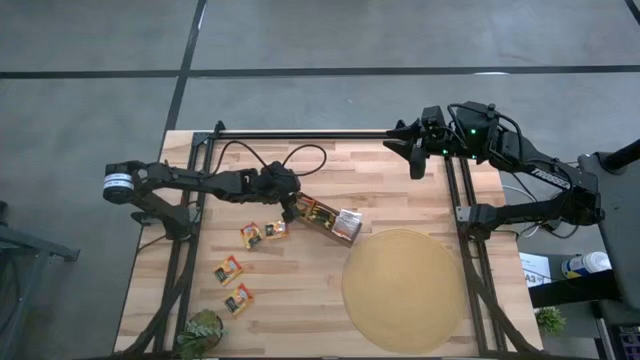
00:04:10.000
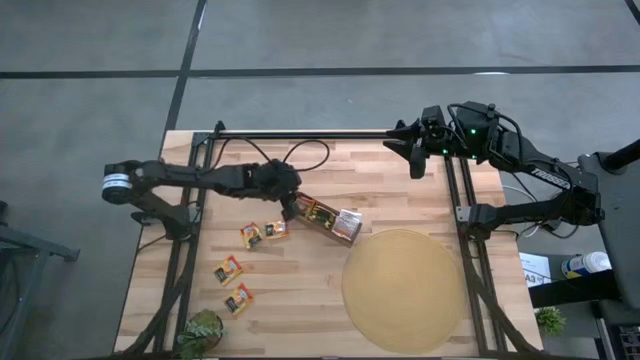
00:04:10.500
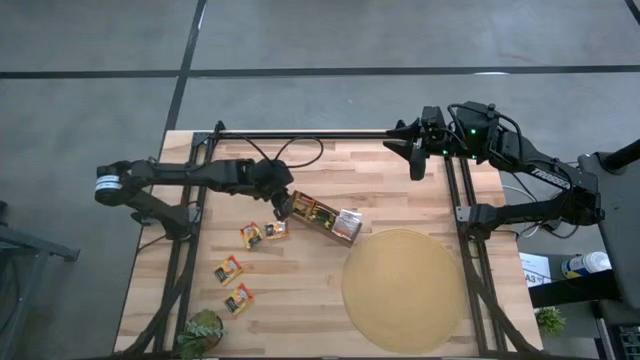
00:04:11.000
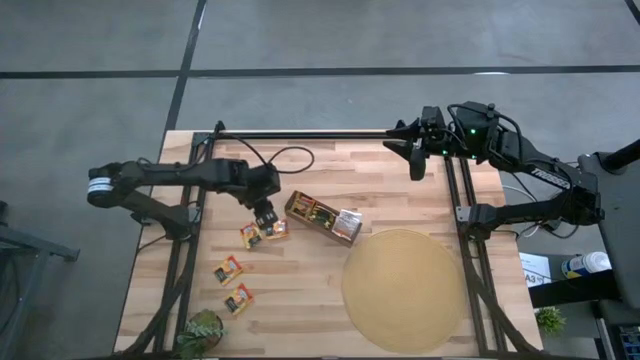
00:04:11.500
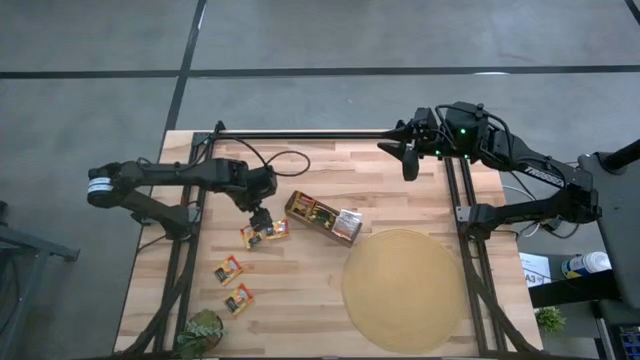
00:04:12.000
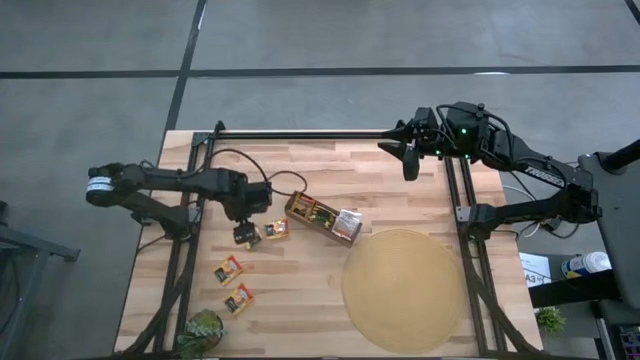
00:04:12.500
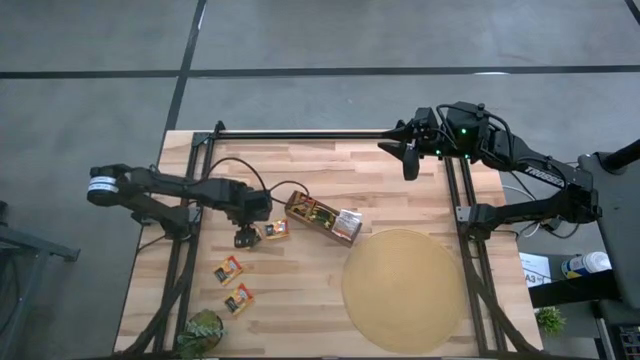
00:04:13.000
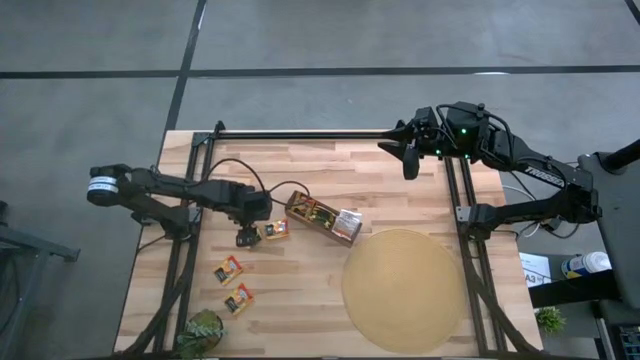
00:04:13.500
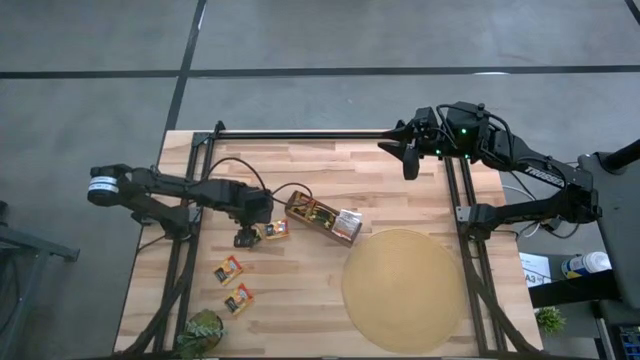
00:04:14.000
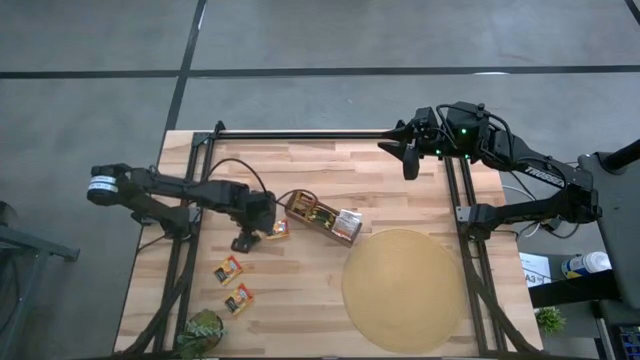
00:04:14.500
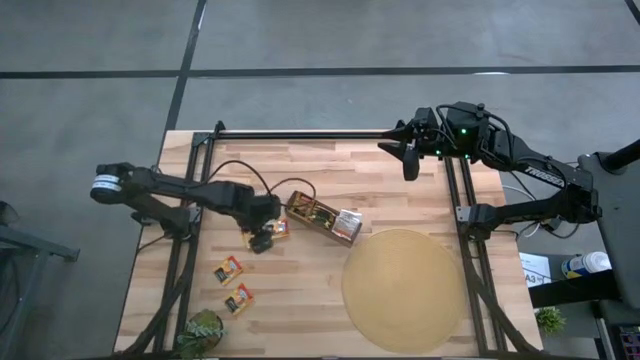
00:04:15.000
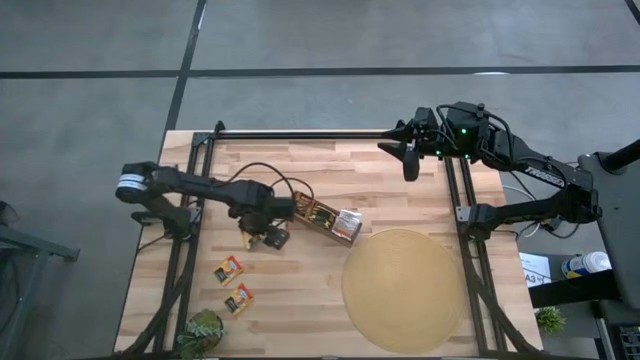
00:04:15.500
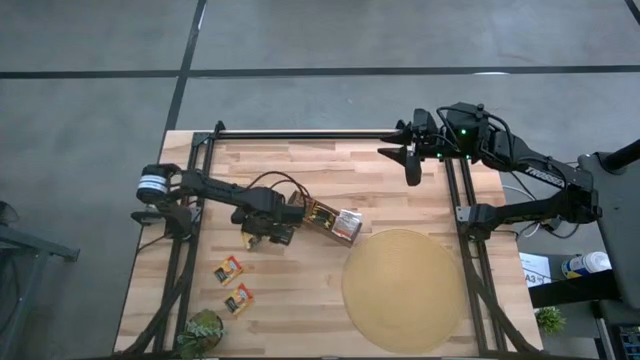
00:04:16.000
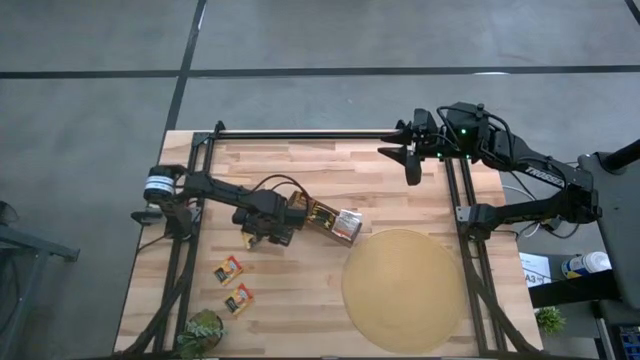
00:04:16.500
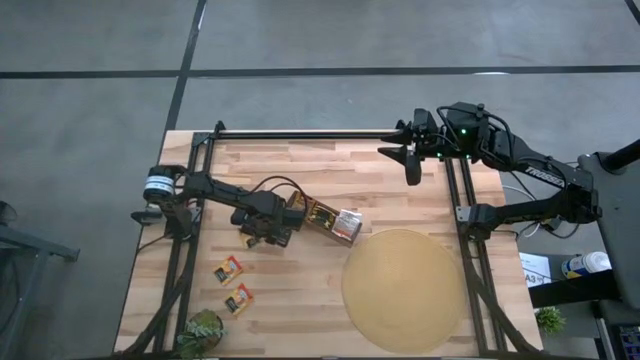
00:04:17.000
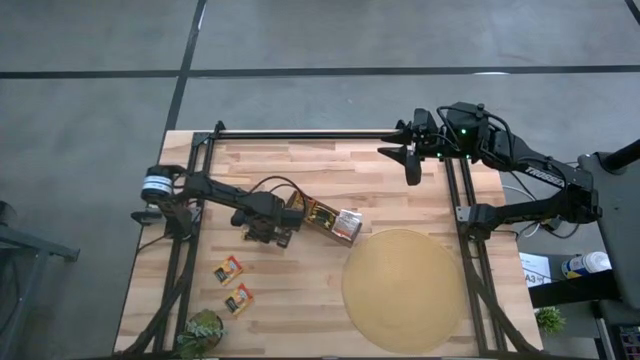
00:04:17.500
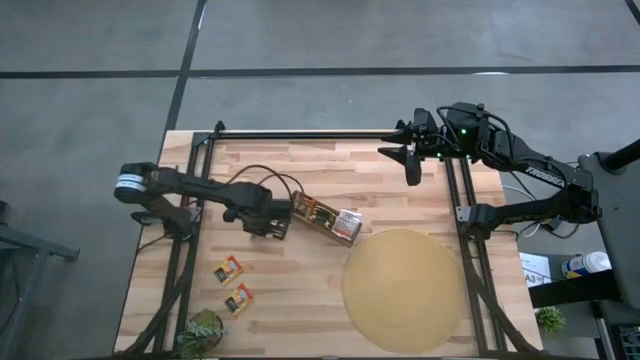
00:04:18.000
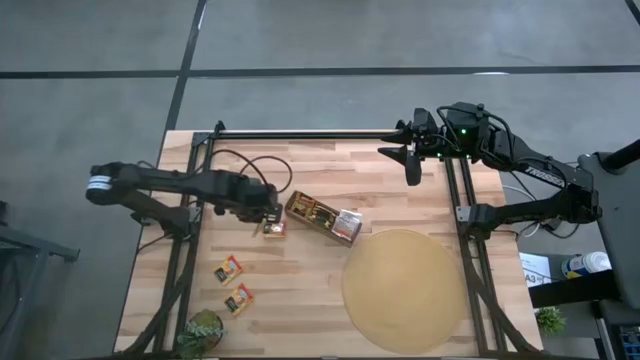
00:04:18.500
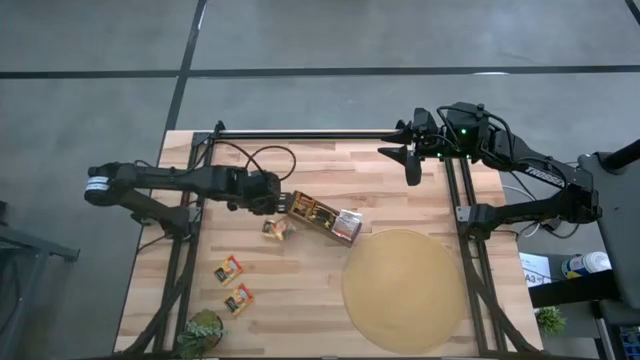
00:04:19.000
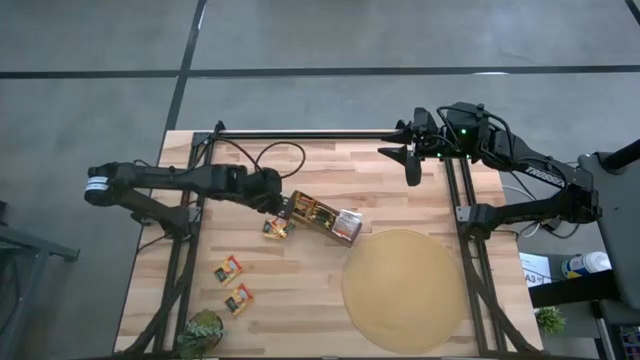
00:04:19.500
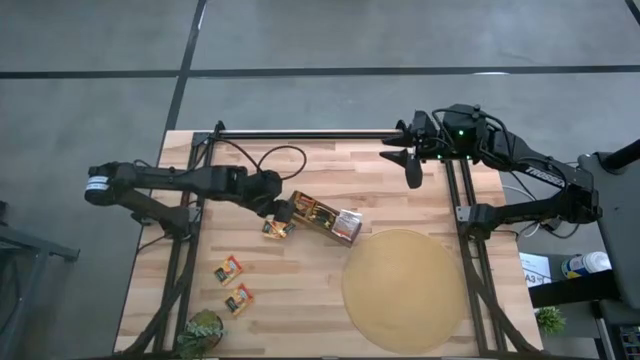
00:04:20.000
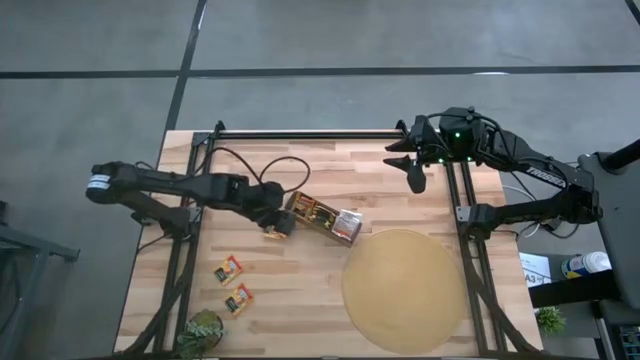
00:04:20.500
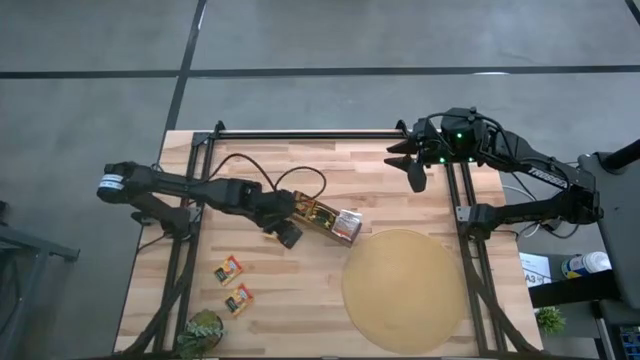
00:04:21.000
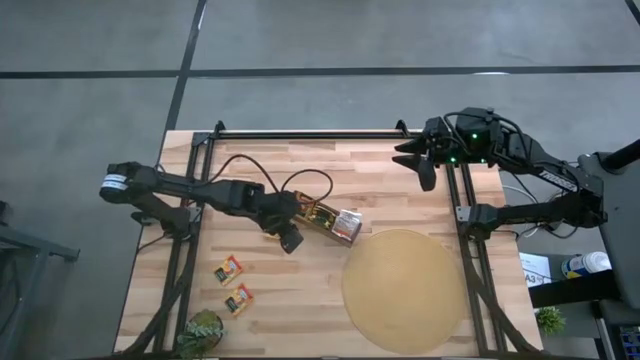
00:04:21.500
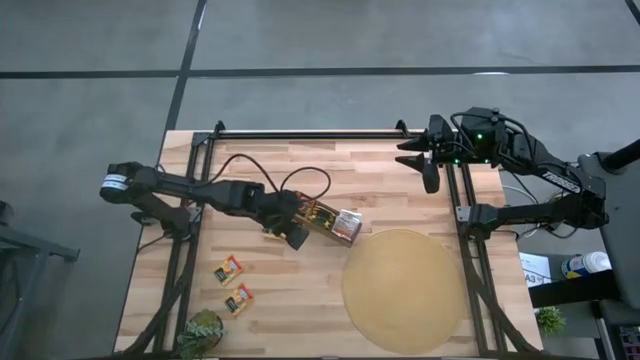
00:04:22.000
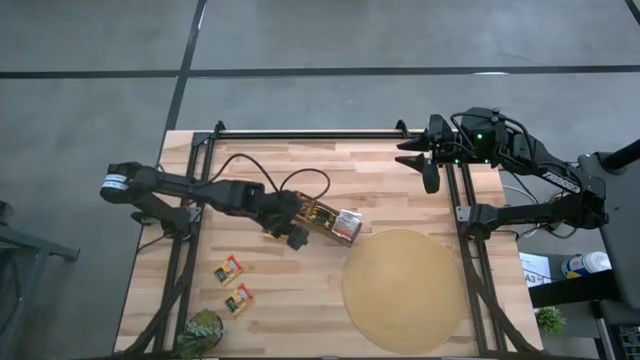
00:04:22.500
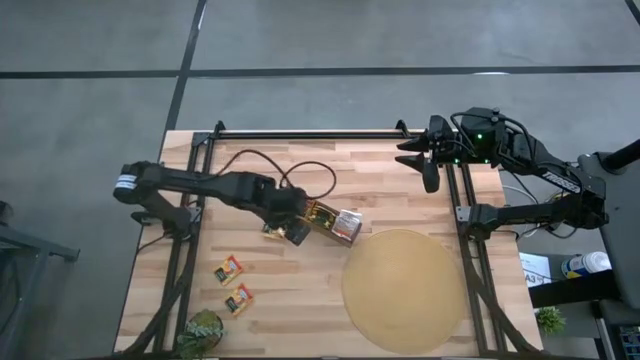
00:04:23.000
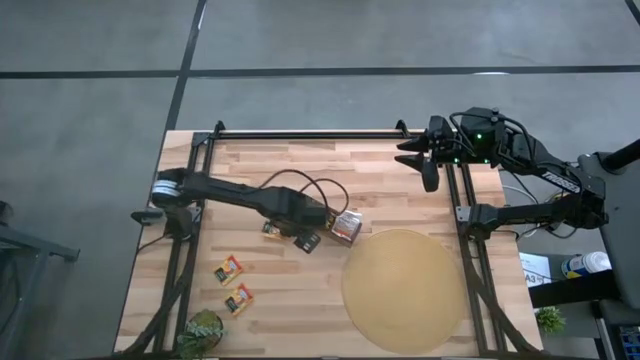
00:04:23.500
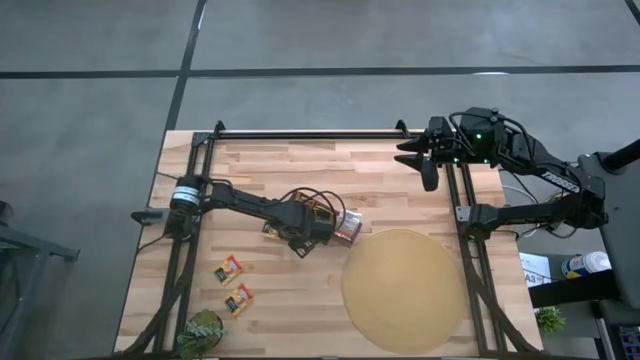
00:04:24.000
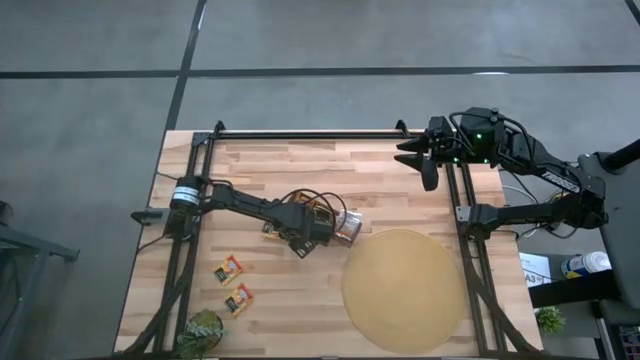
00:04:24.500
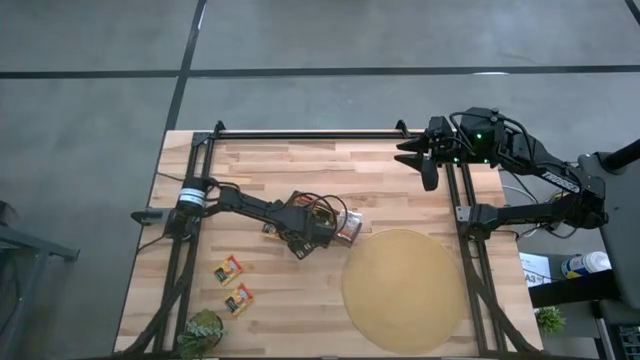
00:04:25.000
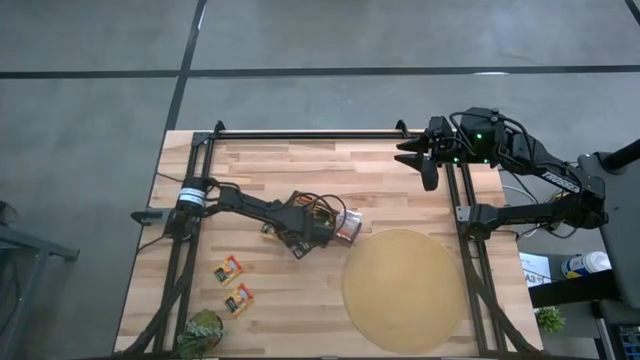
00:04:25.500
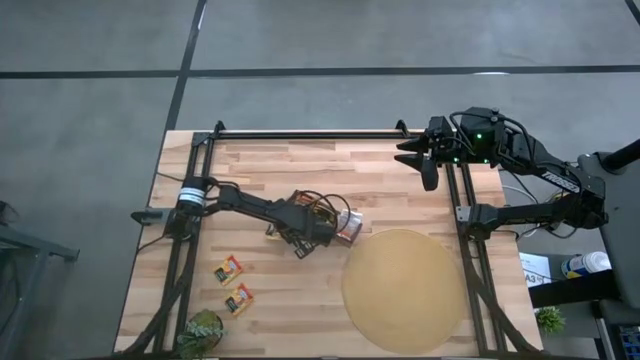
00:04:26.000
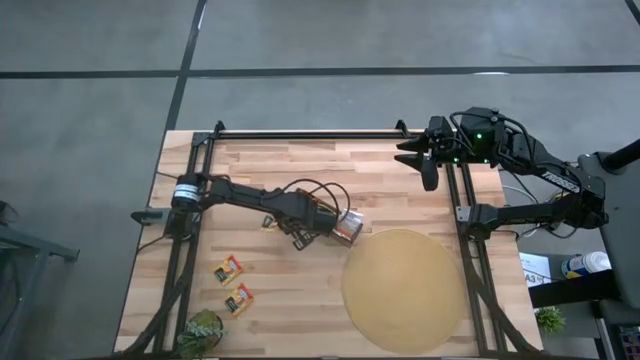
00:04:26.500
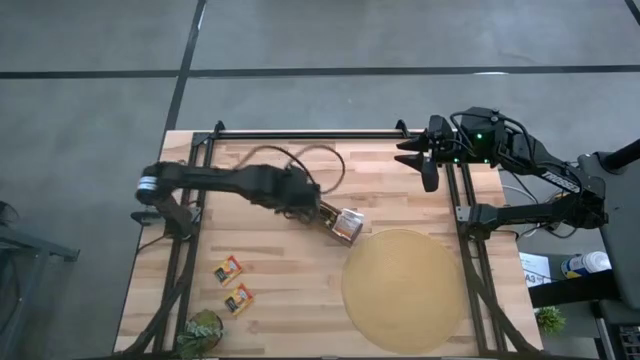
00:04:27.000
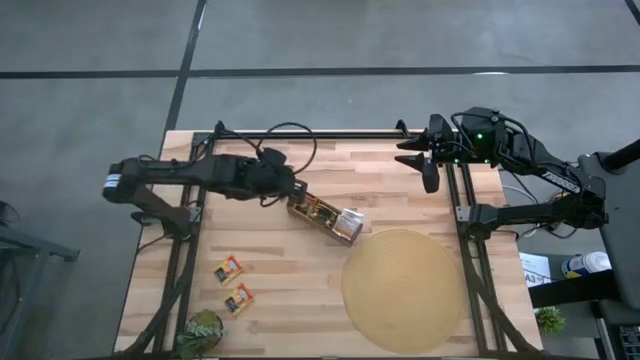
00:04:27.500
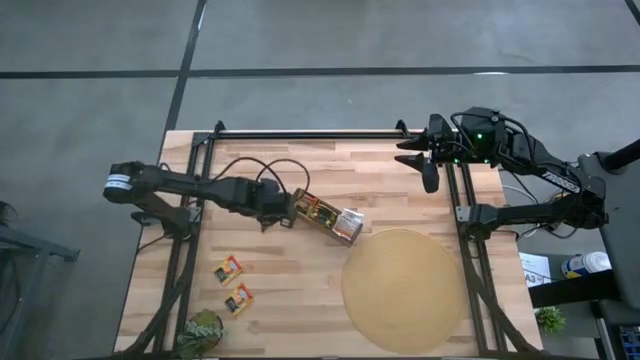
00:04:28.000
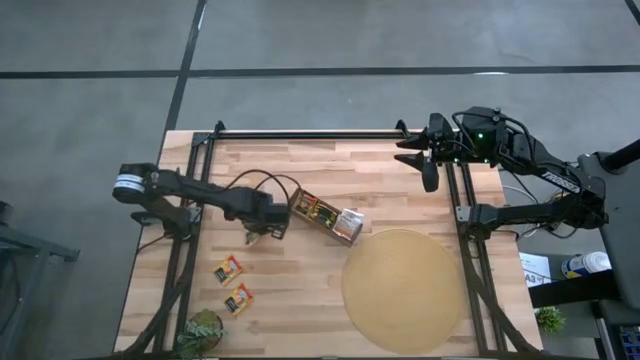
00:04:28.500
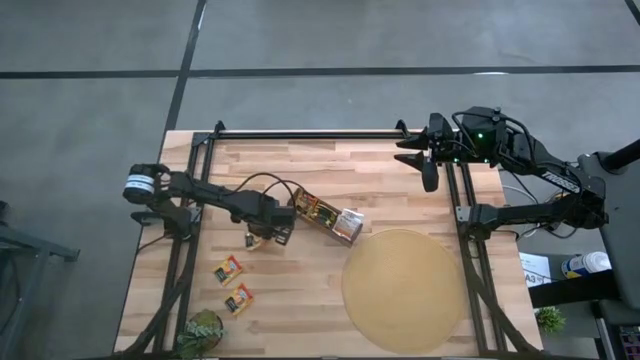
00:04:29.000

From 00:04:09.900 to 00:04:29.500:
Task: Pick & Place Tea
Put the orange tea bag into the left section of the wooden organizer

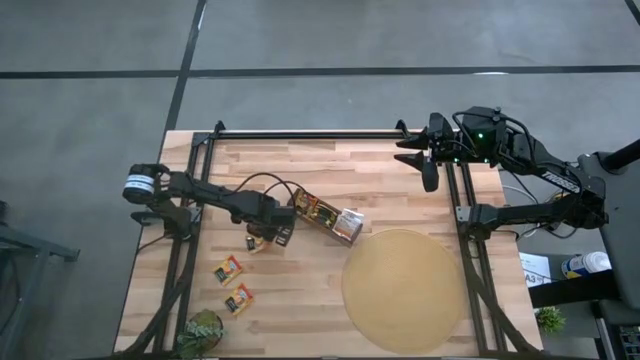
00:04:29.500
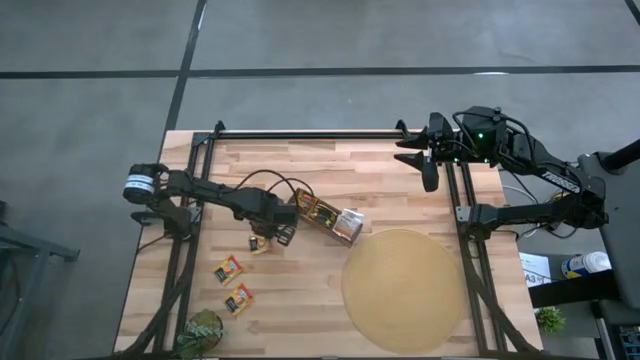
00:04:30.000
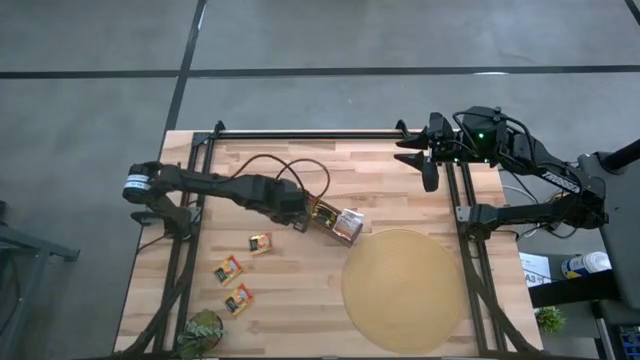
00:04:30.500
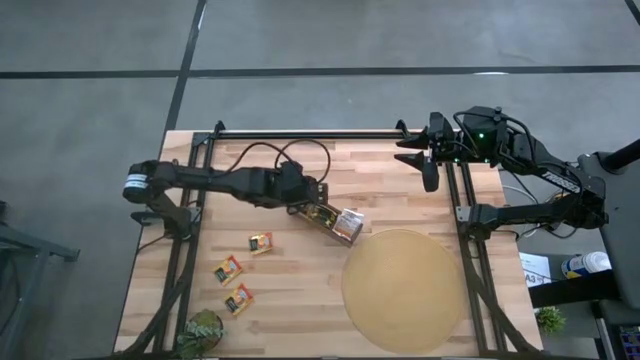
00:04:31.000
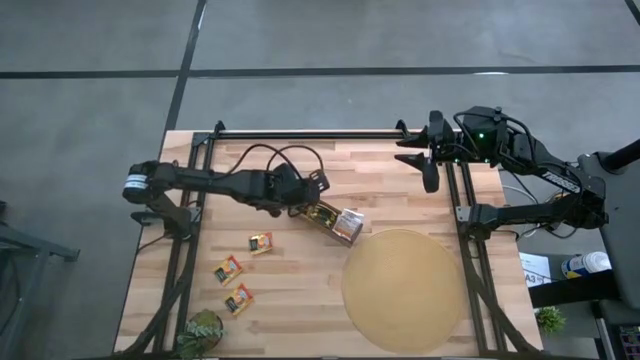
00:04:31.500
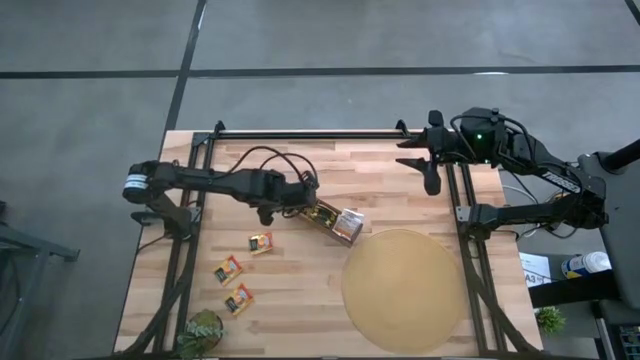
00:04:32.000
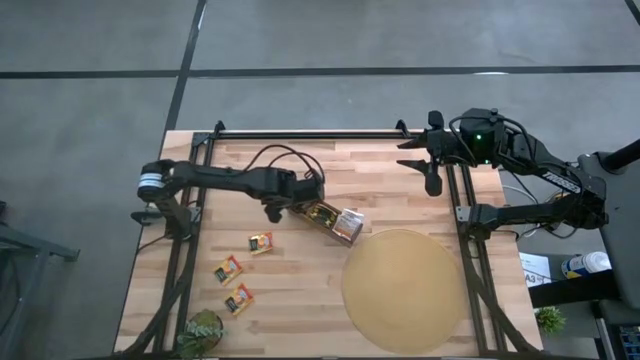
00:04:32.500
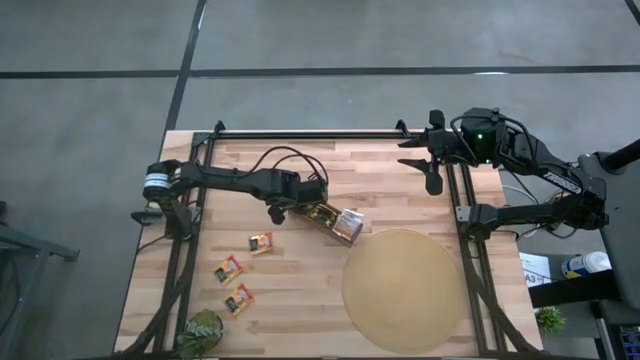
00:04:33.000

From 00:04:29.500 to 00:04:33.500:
Put the orange tea bag into the left section of the wooden organizer
